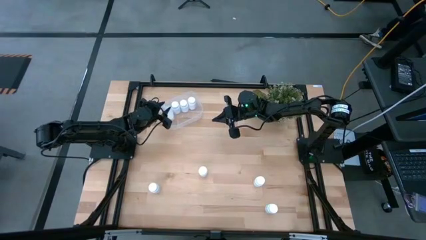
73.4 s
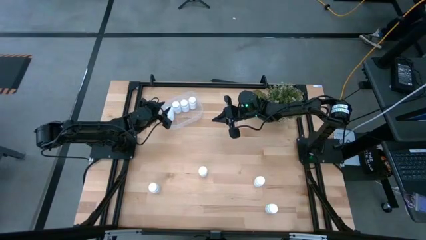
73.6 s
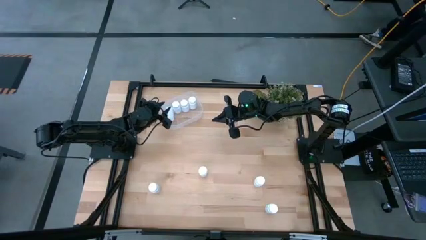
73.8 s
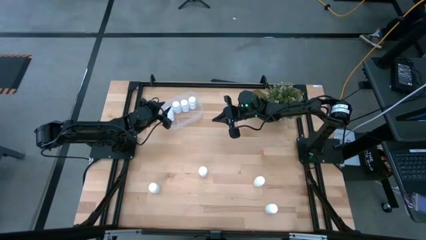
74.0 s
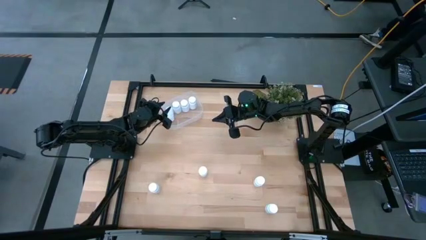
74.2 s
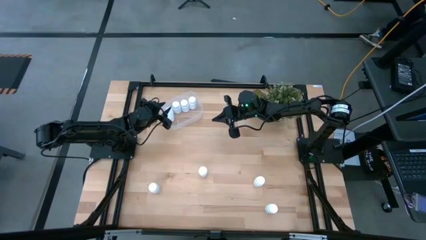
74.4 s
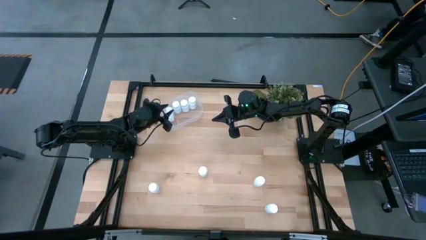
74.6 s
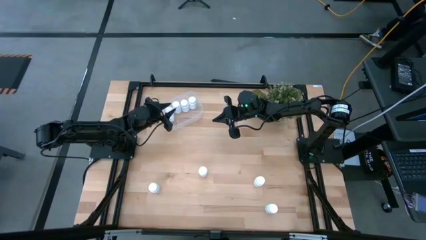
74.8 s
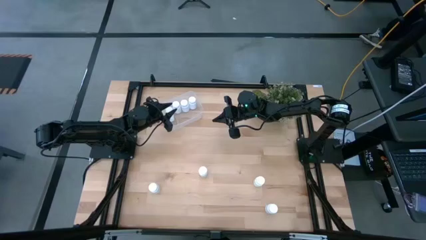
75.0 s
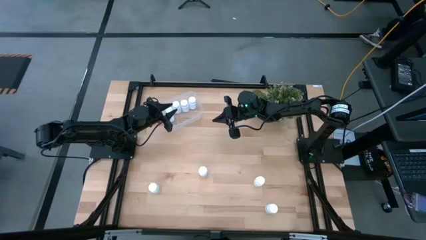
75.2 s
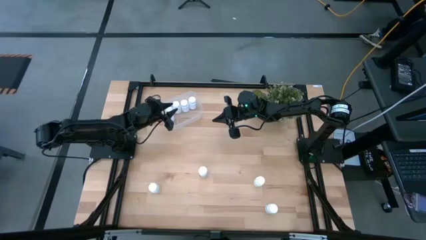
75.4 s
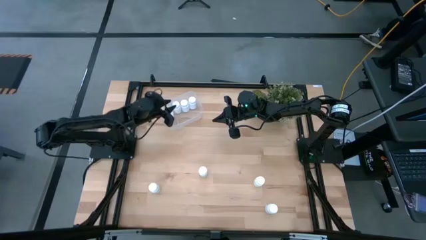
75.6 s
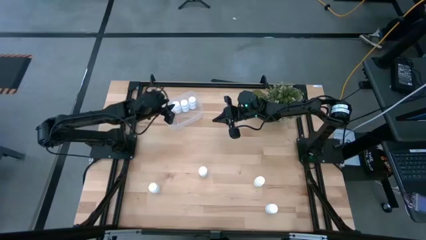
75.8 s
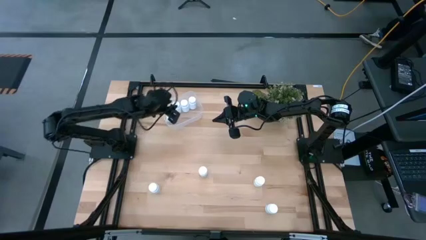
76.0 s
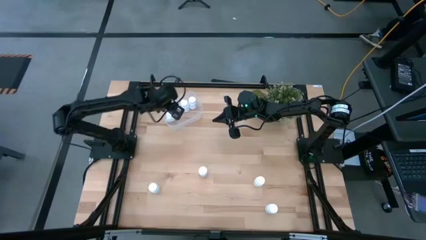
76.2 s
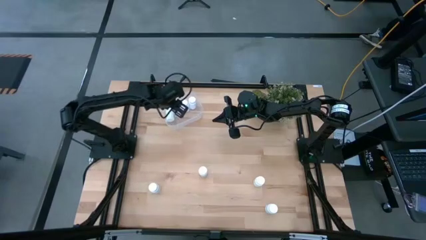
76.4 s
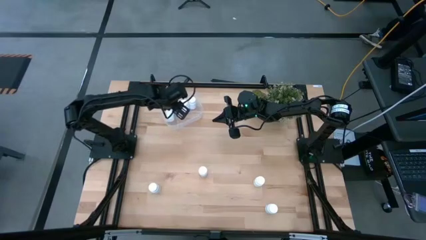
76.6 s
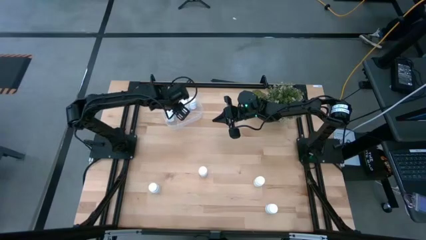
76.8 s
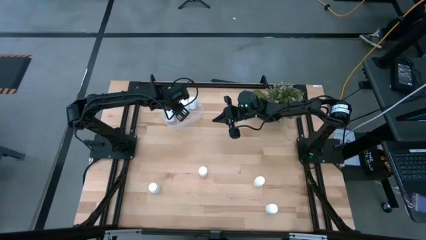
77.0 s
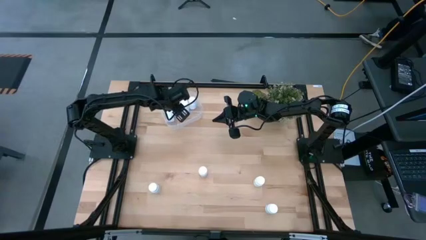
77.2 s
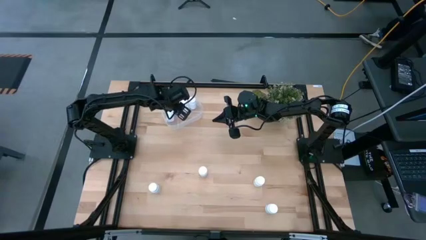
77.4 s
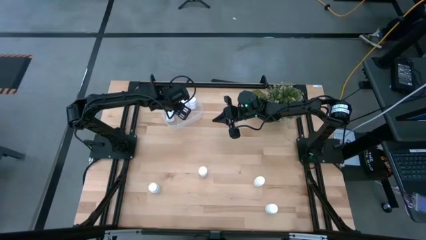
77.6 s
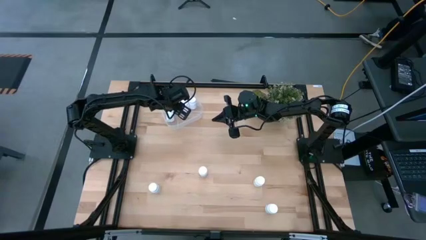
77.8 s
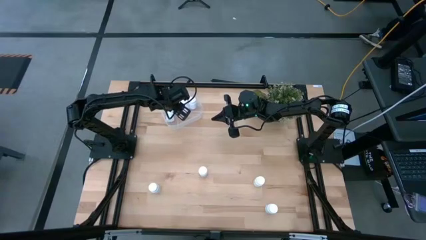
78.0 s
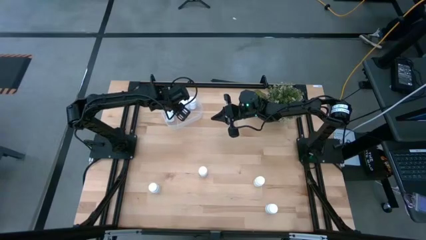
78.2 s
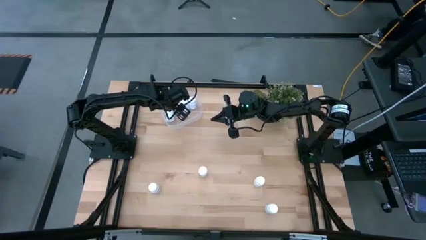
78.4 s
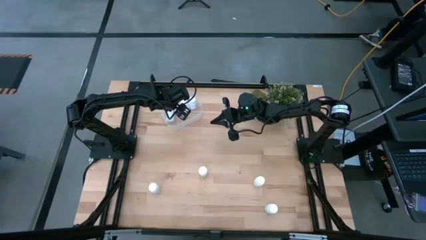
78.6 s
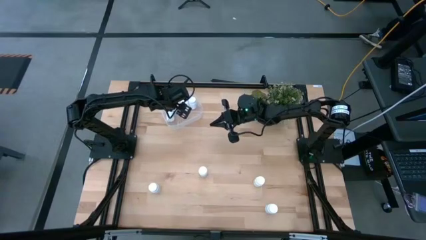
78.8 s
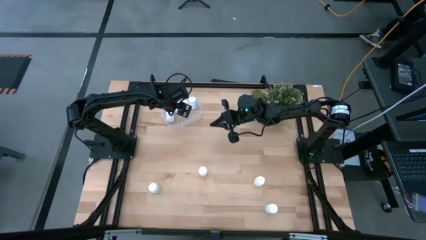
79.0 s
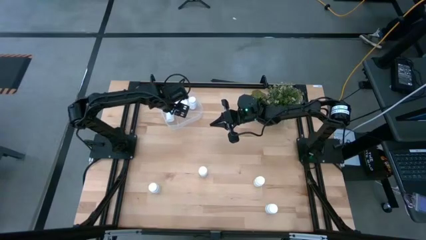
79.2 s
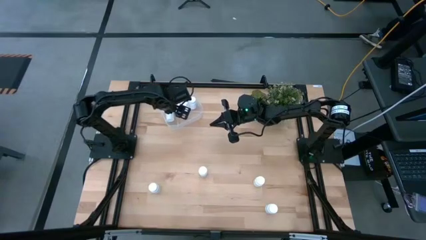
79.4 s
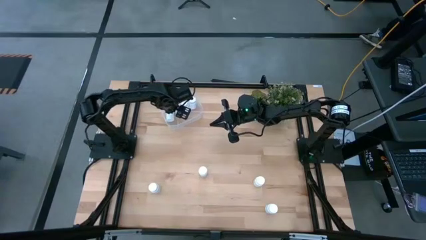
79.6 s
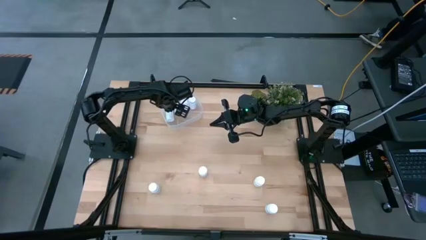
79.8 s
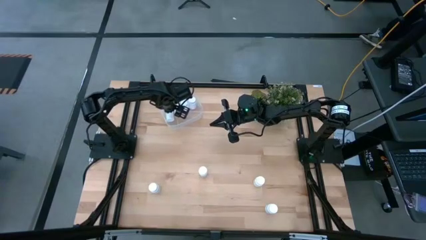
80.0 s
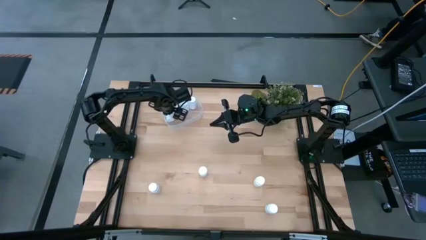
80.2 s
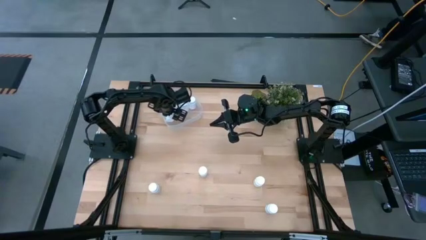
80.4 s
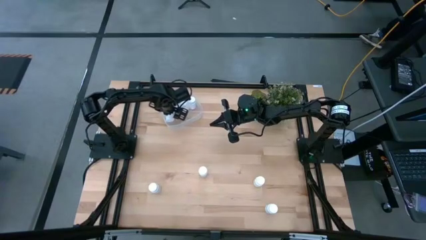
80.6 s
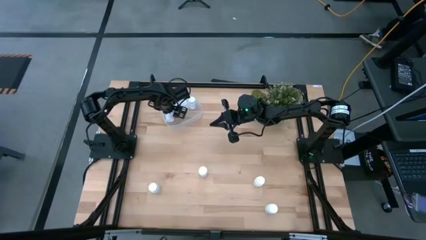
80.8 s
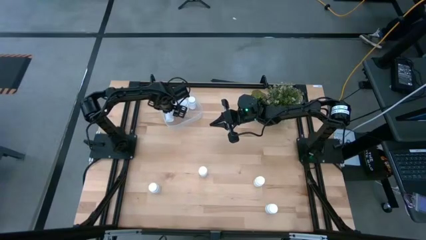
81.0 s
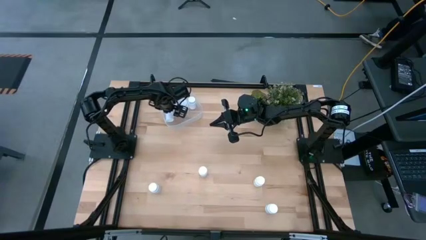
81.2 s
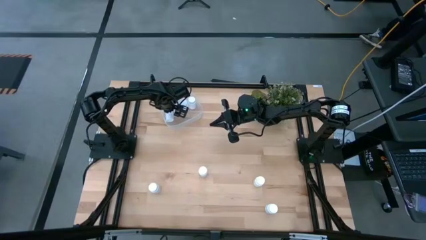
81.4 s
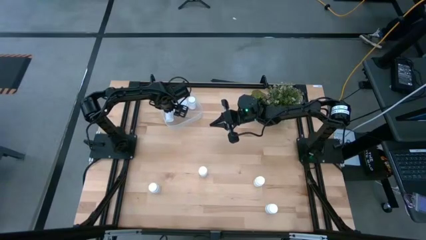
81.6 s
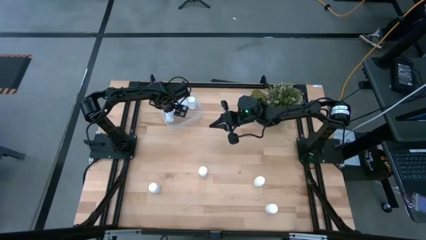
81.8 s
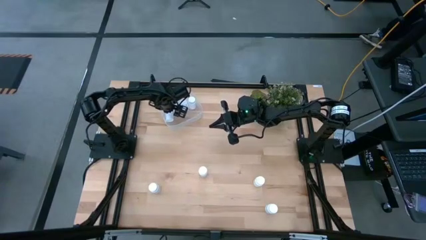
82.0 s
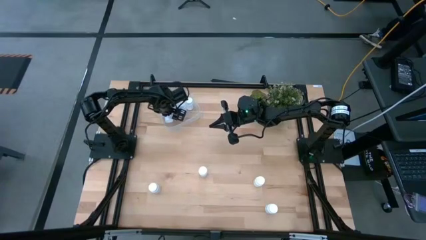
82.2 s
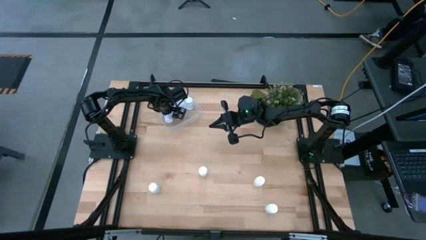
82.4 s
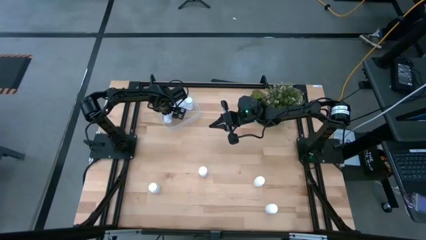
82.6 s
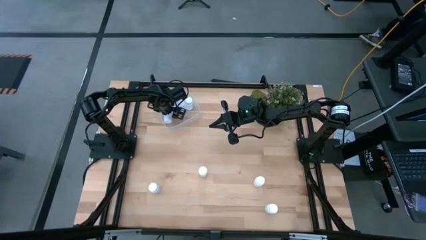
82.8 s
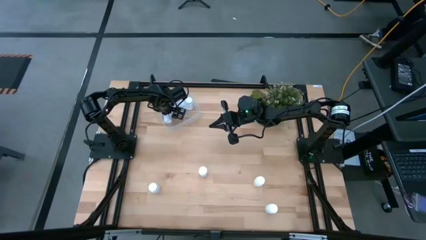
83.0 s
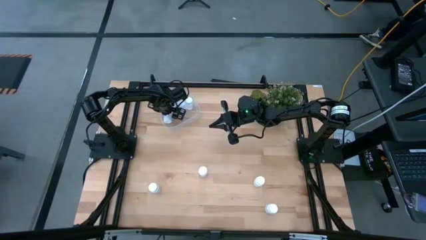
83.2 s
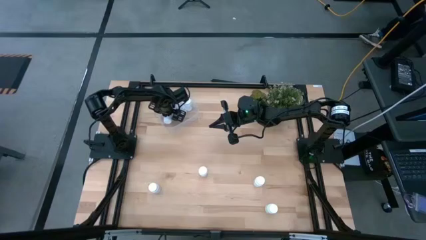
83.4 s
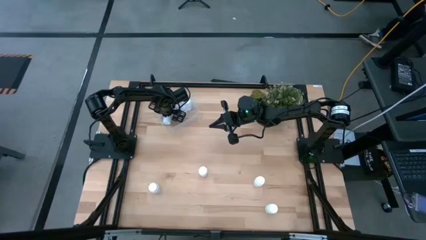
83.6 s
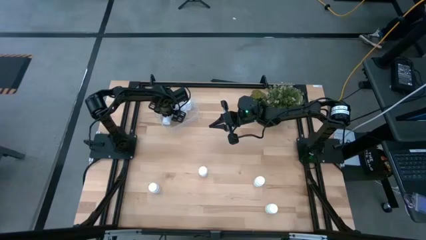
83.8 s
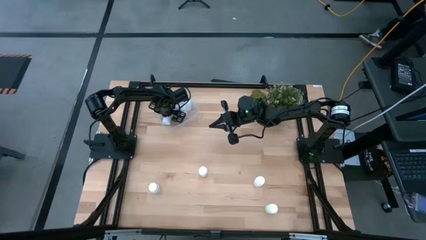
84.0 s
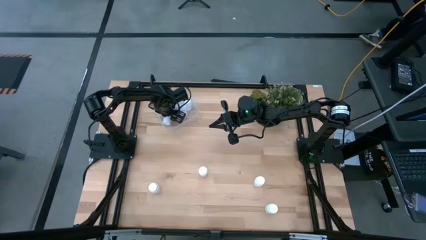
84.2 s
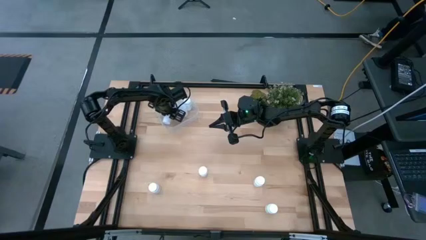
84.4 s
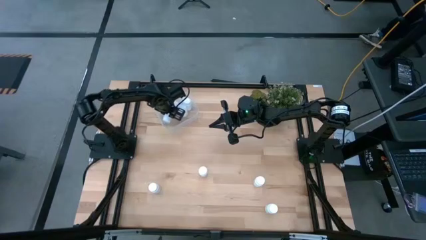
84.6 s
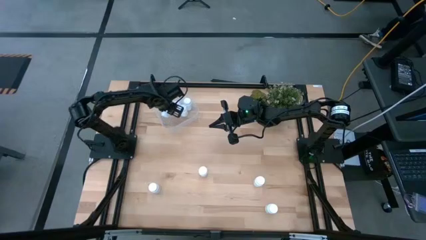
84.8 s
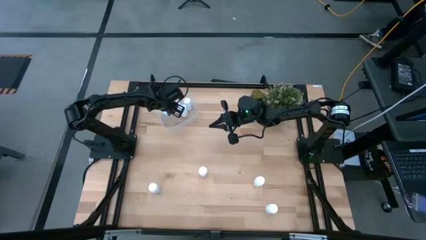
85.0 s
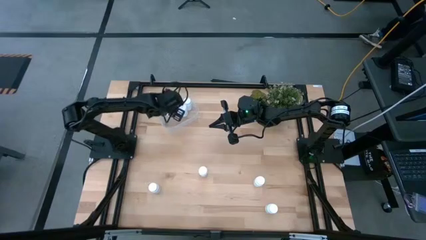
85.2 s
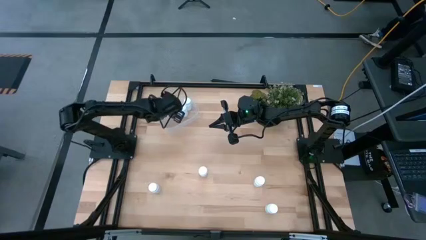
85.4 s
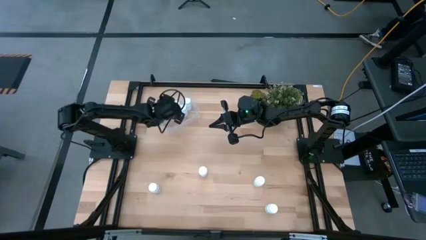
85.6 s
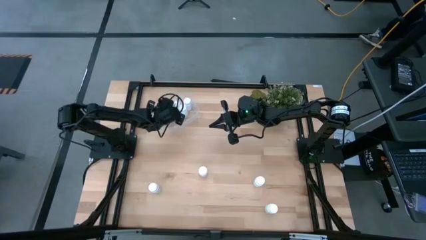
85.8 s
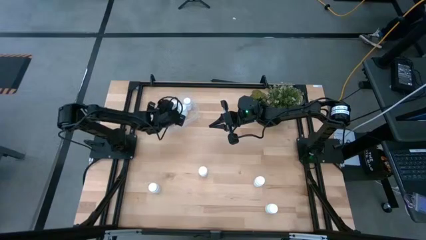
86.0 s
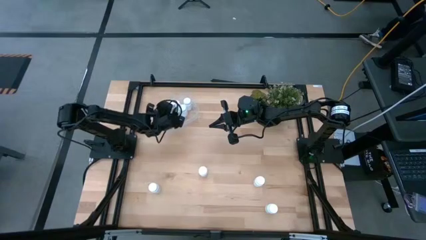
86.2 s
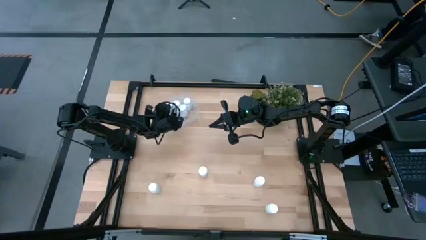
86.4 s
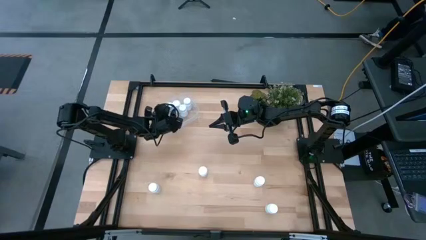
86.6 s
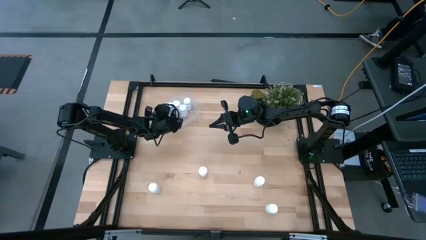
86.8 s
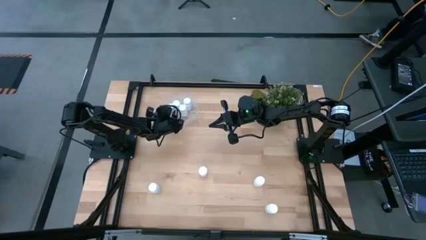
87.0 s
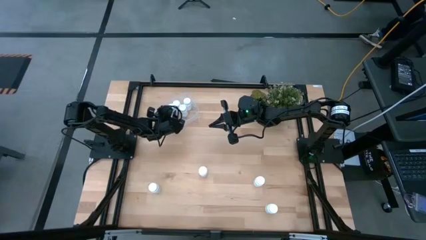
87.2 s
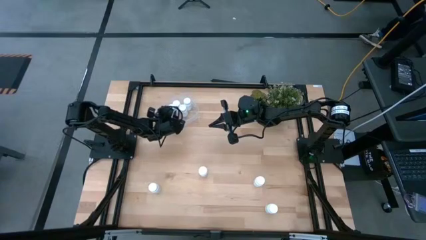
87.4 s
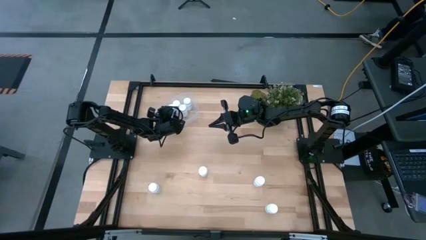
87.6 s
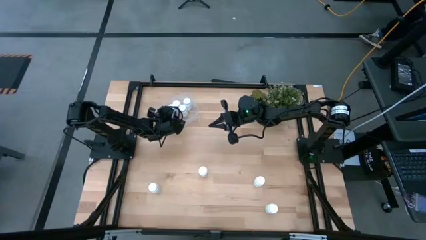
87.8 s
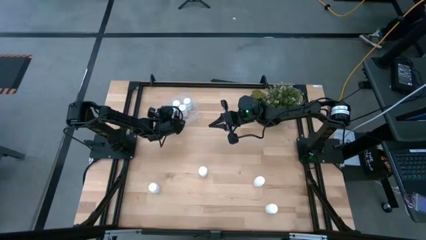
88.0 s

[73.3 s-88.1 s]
Task: Pick and place pill bottles into a basket
Put the white medicine bottle into the transparent bin
